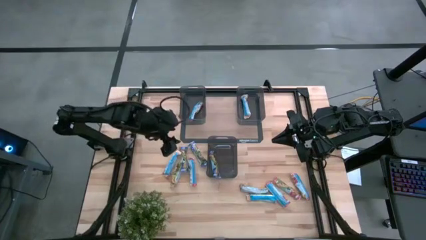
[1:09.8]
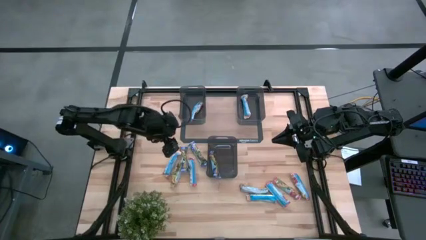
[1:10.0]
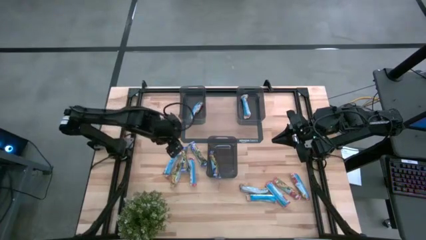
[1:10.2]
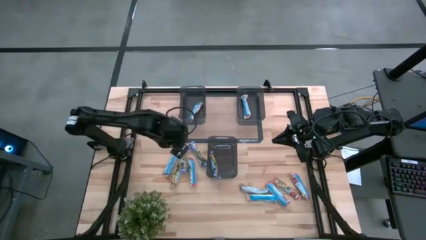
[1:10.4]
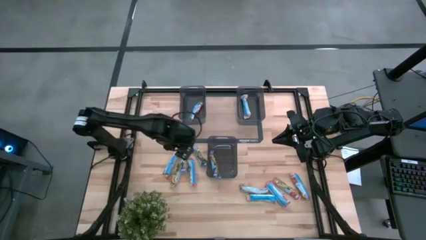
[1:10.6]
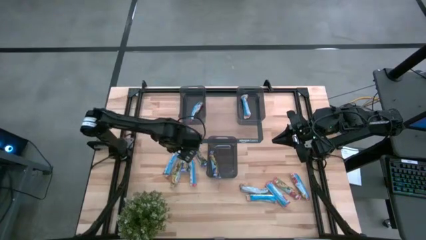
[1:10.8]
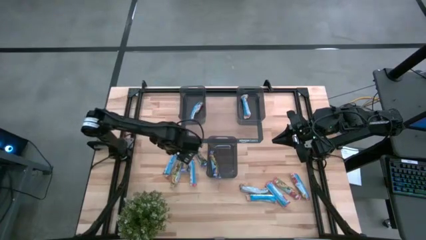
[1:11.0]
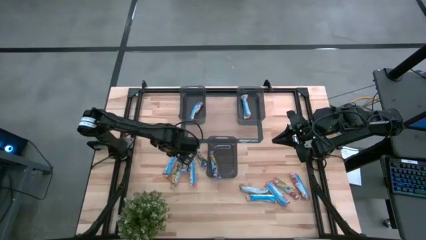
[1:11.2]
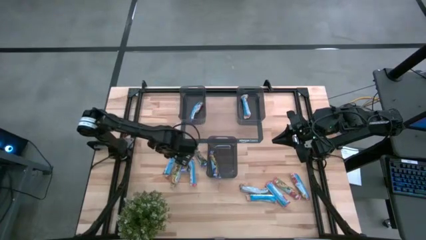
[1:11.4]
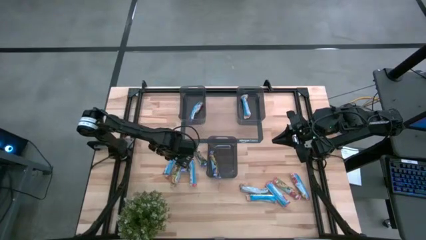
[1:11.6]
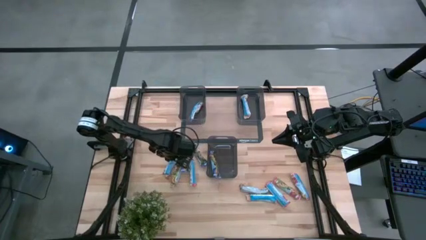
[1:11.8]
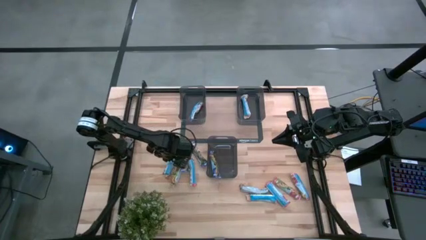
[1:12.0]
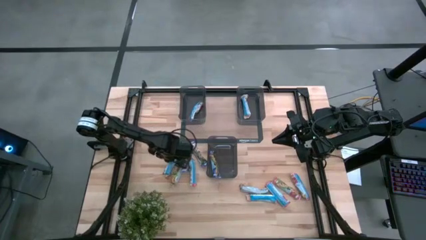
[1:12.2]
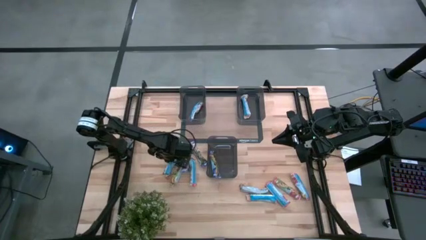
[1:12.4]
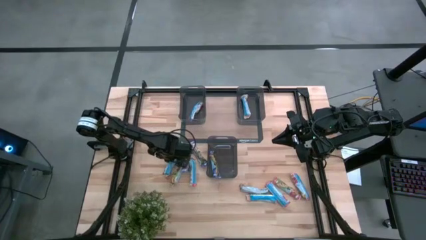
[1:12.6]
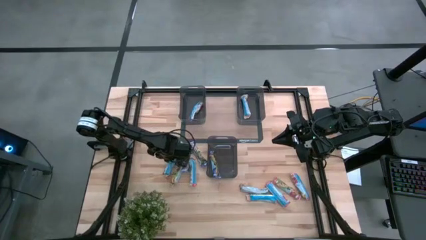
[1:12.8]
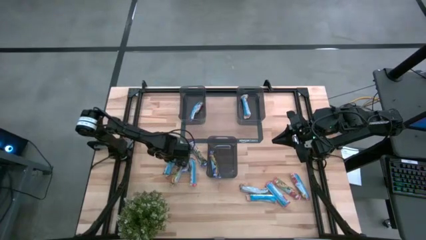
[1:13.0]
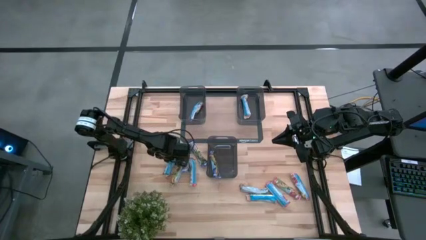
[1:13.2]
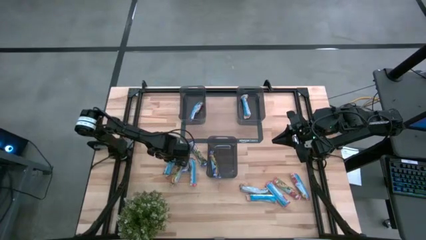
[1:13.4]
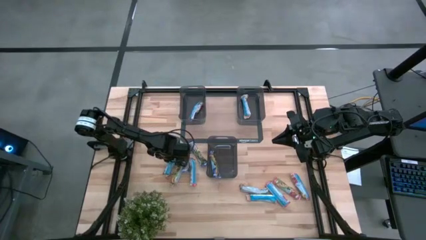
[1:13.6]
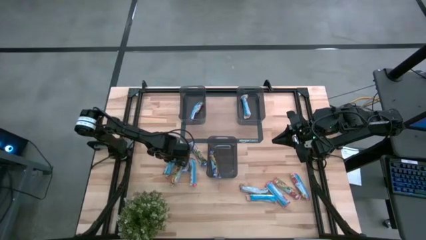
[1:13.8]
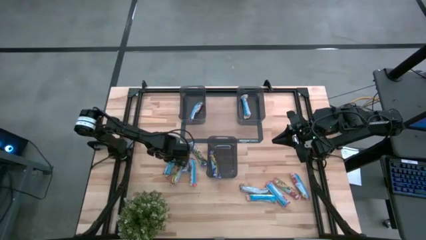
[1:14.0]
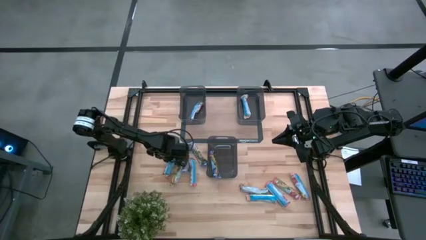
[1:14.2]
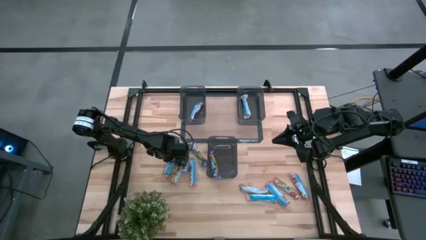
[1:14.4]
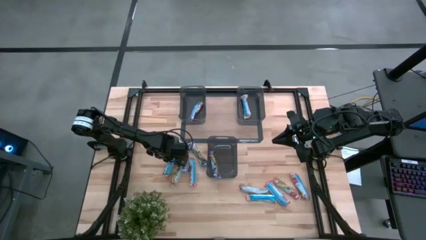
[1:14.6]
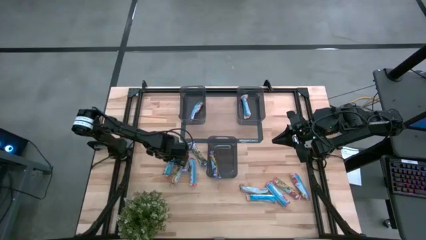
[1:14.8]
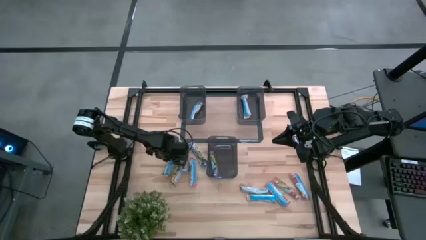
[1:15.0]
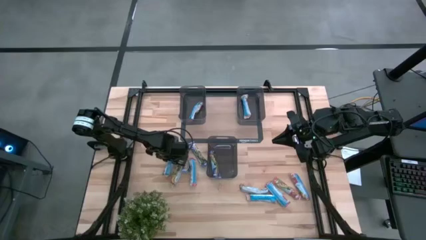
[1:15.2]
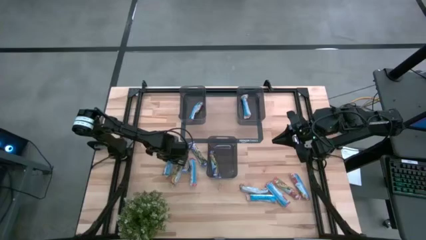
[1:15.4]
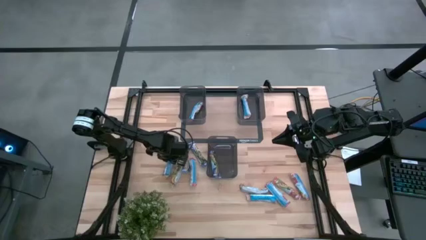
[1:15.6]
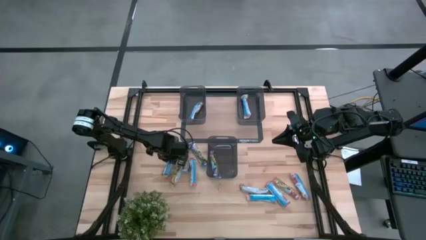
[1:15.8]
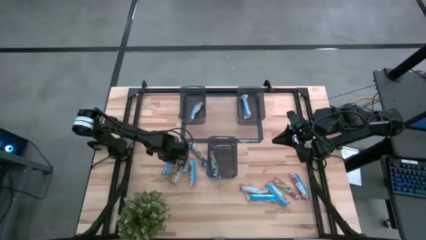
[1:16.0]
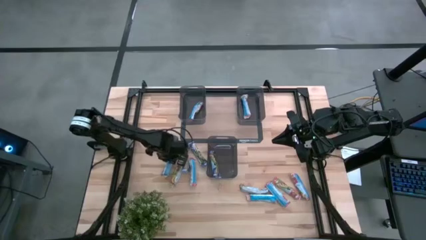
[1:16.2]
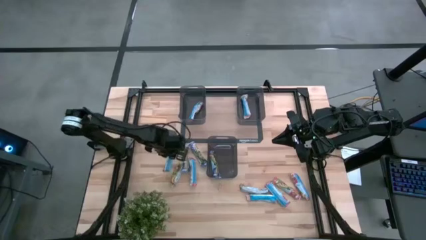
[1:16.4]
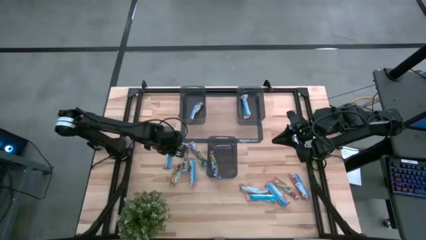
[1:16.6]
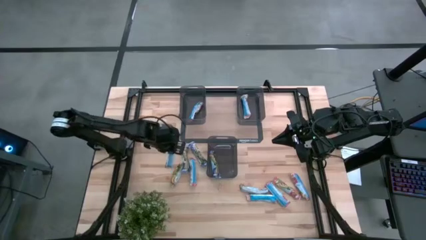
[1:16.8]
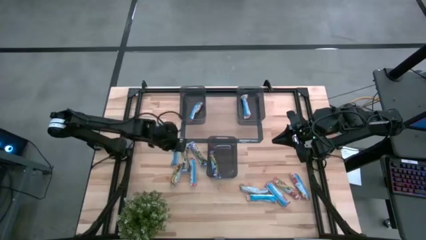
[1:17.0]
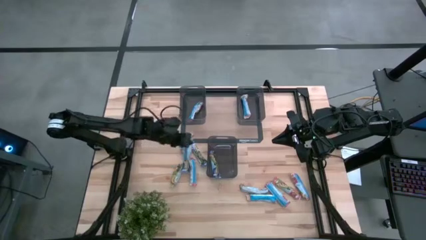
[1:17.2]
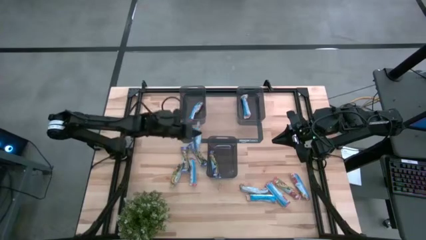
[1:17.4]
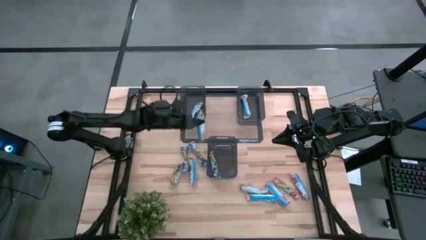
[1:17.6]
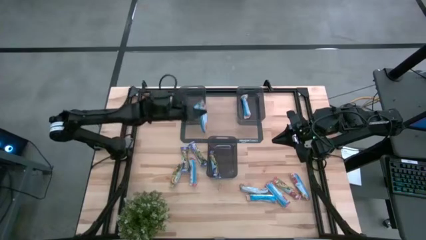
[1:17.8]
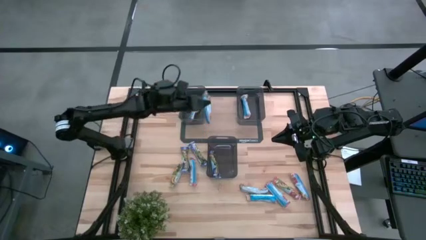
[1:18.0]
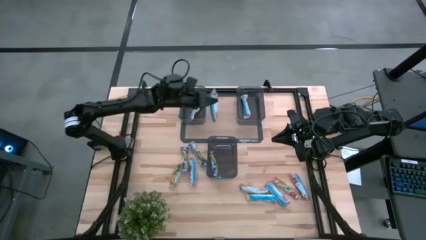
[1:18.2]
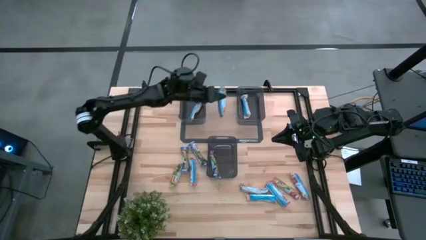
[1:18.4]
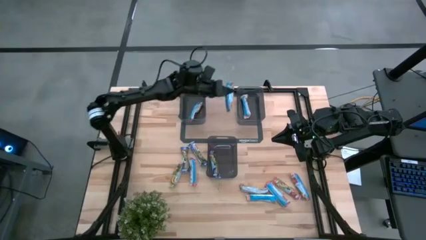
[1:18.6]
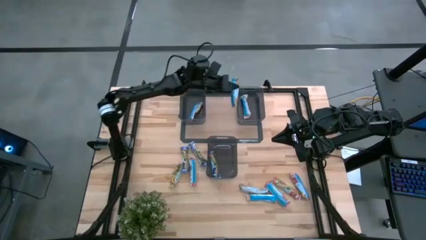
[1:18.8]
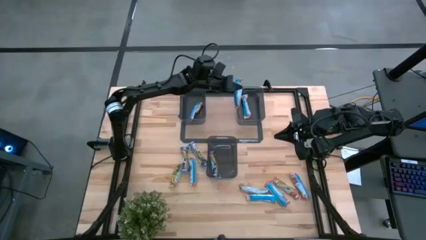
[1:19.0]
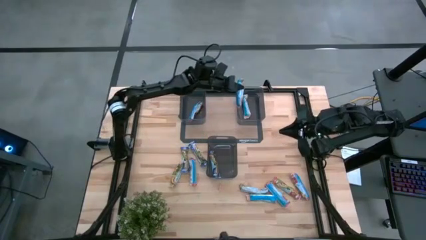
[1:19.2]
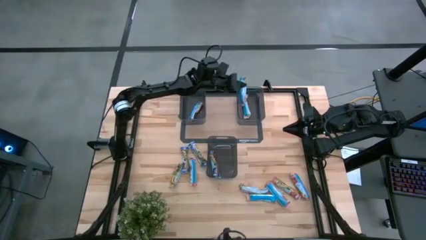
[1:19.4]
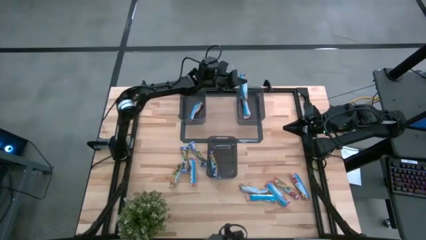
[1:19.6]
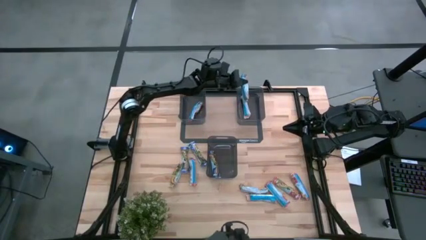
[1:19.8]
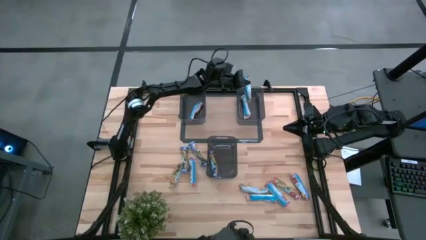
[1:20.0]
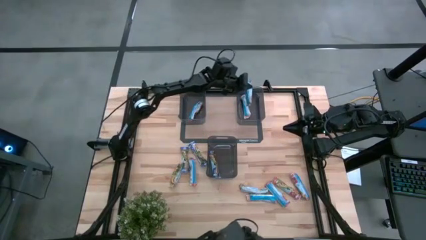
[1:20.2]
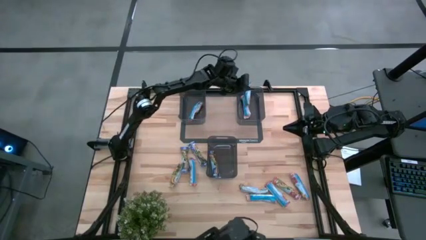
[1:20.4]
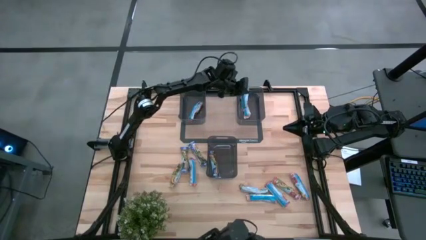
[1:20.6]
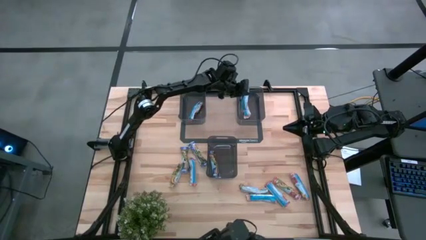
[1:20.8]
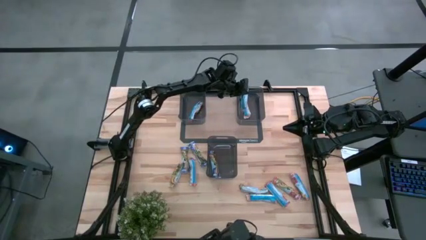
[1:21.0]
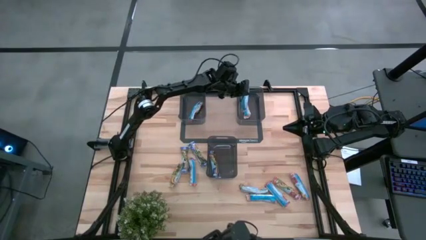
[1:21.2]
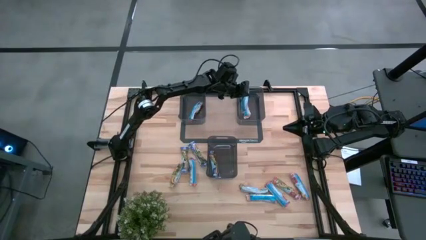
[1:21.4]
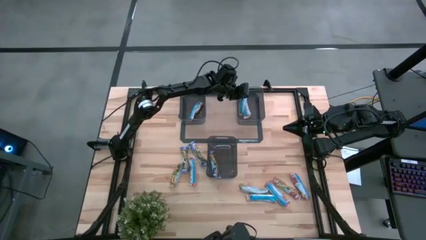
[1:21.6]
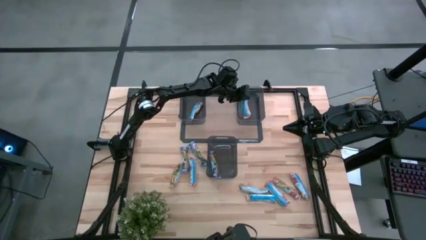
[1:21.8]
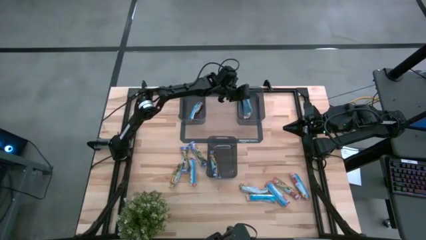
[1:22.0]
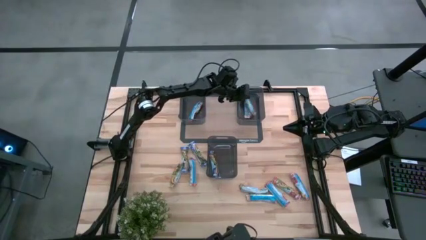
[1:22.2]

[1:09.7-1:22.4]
Task: Pick and place Granola Bars by type
Put the yellow granola bar into the right black bin
